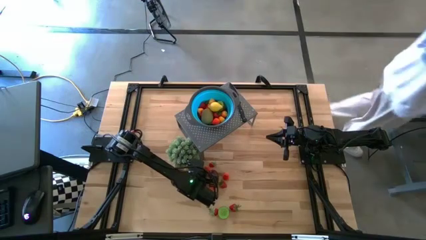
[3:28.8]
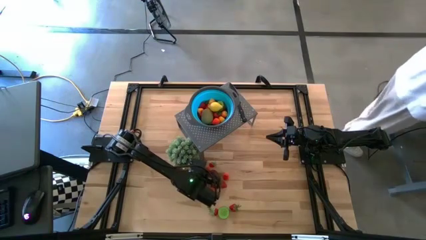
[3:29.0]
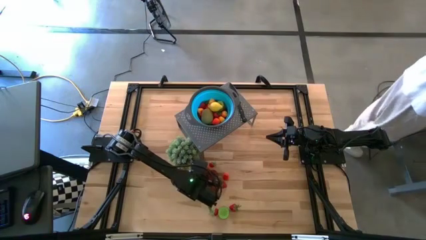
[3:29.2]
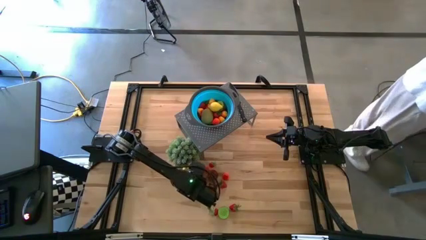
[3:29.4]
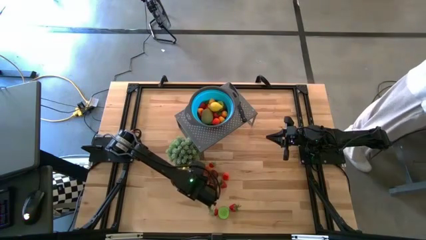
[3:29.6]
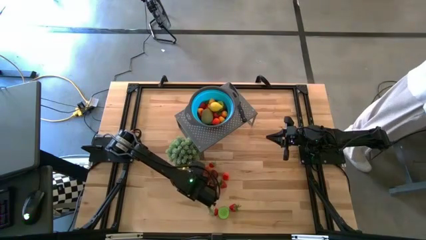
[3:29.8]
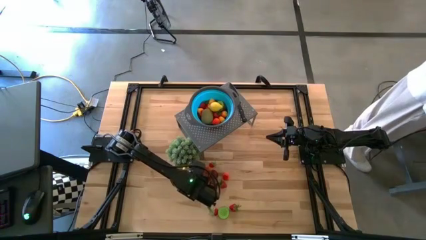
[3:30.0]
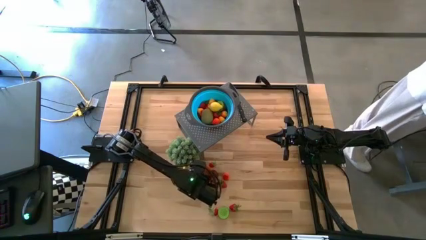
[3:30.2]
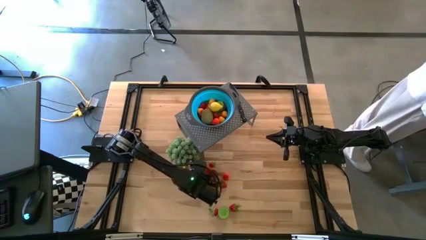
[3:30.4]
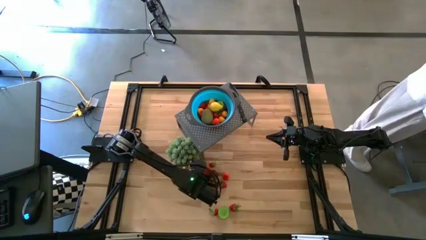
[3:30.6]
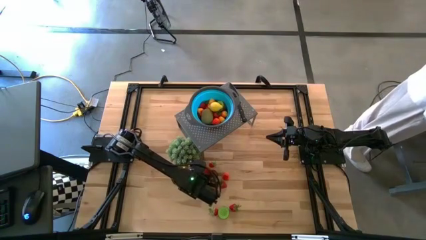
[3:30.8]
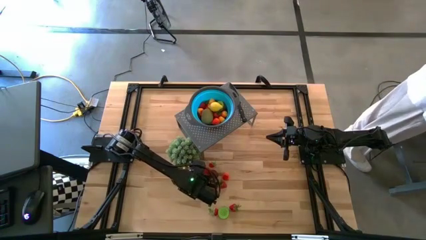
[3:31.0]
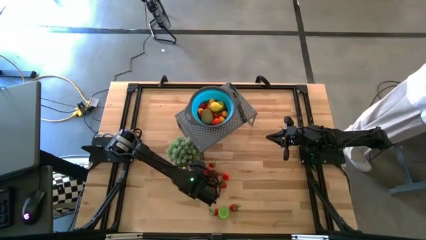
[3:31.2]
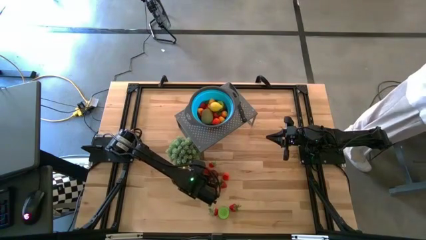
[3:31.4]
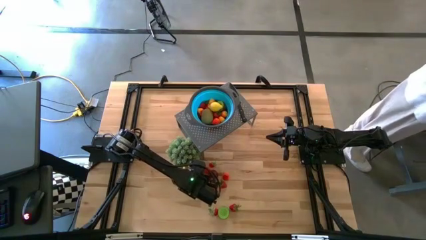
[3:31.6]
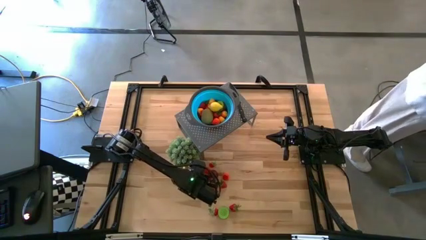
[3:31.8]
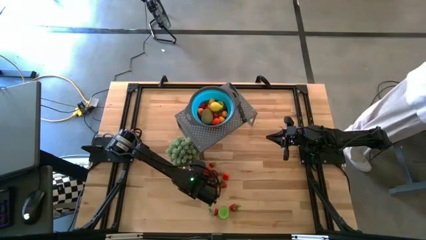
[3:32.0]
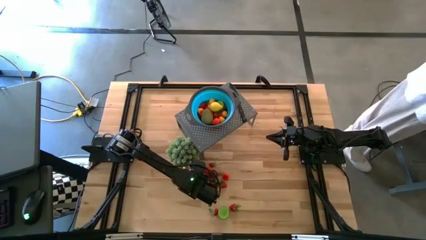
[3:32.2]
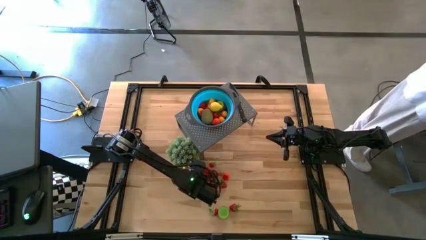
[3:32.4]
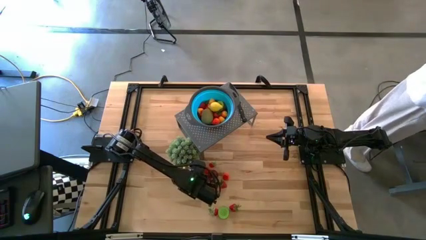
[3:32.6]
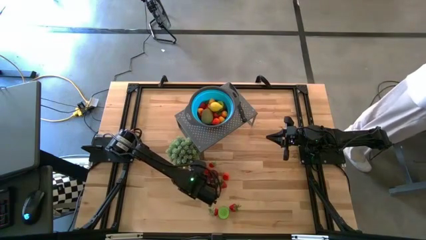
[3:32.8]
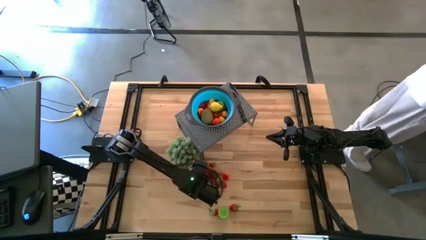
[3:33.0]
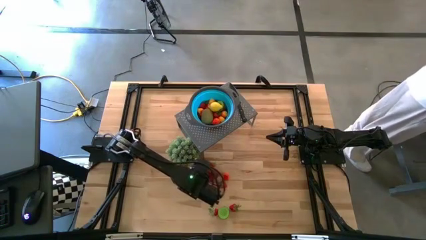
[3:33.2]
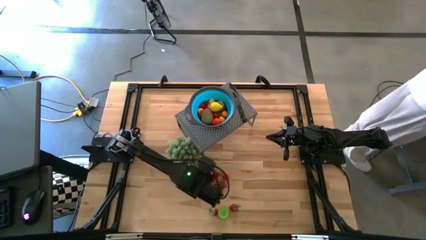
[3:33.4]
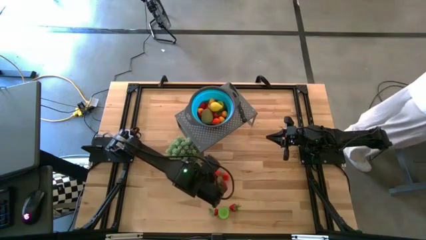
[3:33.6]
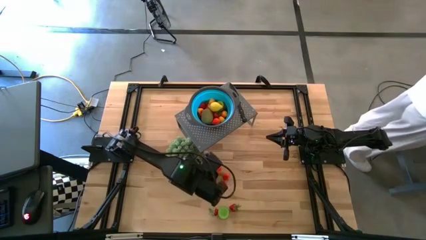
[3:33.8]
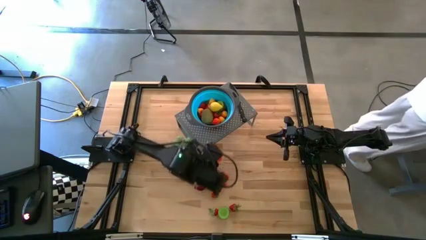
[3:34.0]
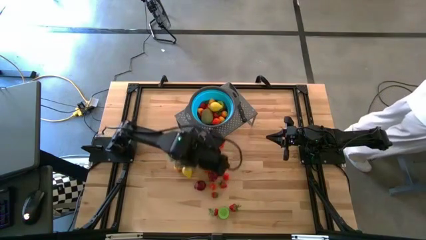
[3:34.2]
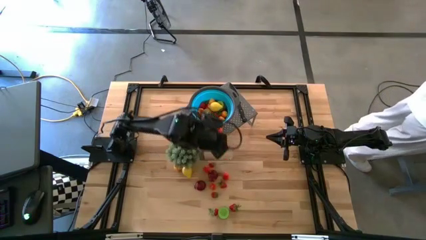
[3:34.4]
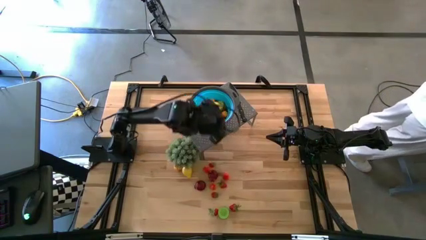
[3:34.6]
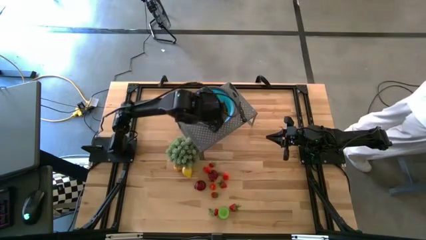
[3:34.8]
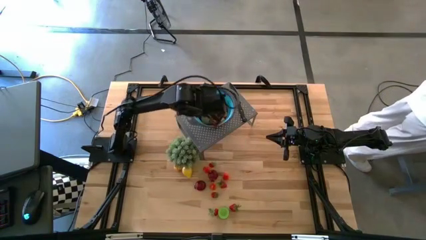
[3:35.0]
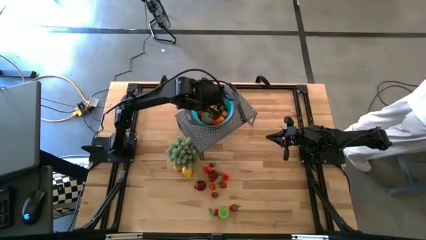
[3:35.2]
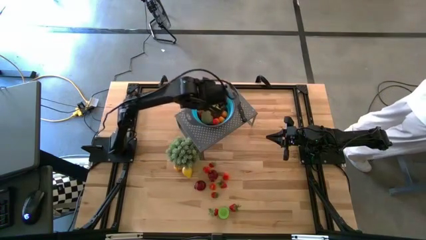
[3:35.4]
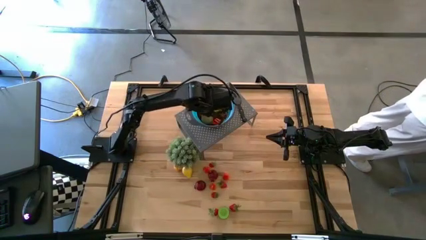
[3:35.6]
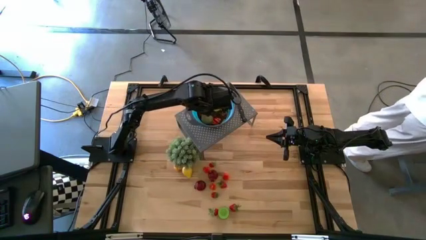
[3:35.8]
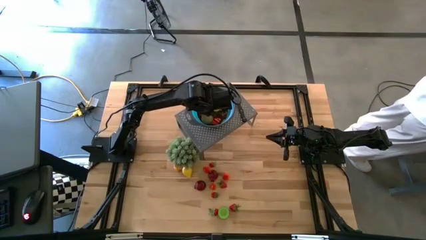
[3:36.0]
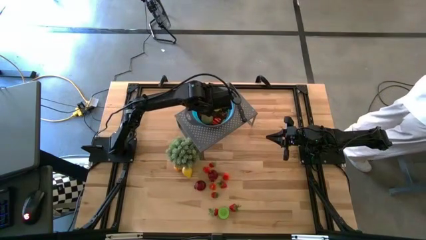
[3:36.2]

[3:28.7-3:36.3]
Task: Pick & Place Fruit
Put the pear into the blue strainer bowl on the shelf

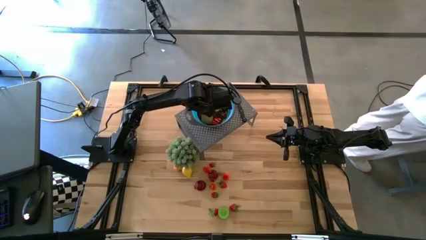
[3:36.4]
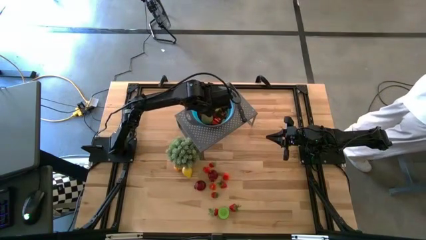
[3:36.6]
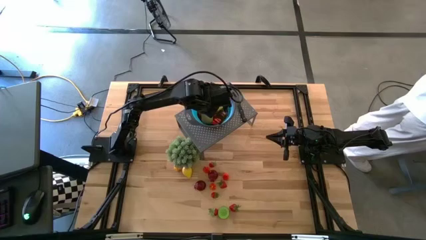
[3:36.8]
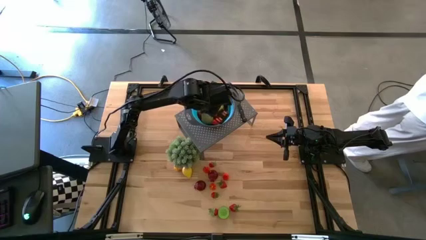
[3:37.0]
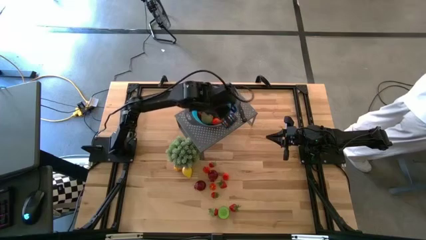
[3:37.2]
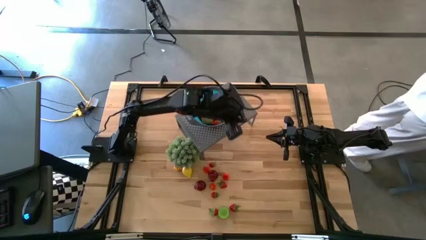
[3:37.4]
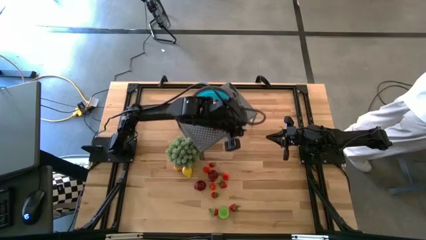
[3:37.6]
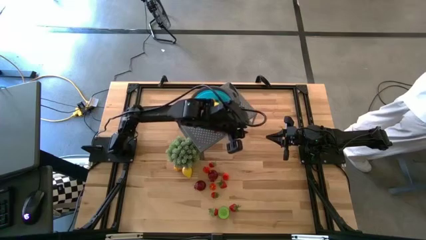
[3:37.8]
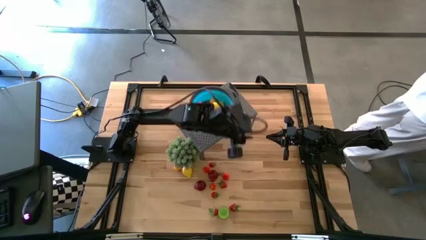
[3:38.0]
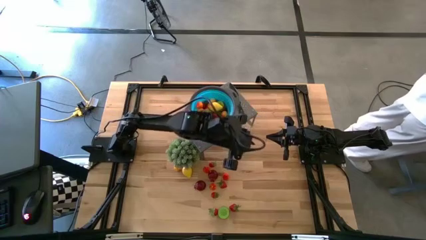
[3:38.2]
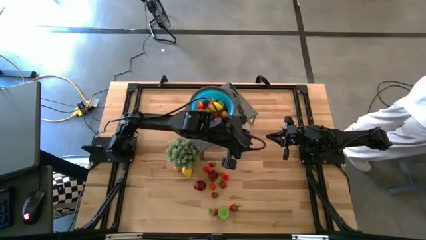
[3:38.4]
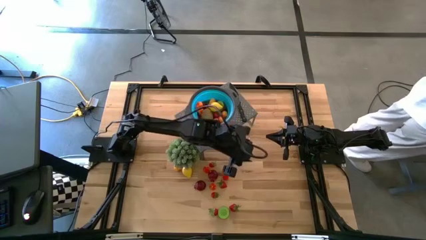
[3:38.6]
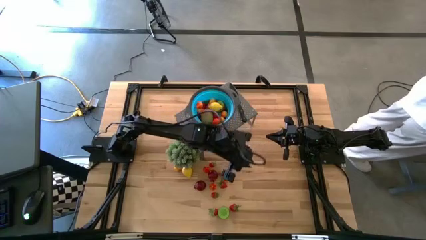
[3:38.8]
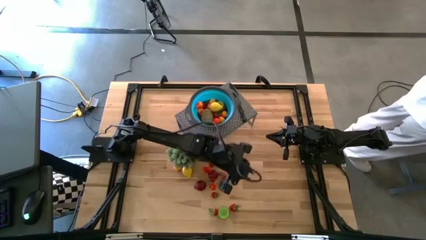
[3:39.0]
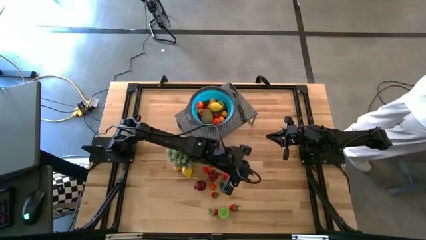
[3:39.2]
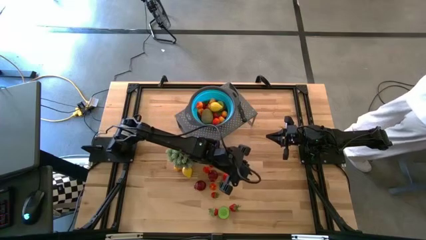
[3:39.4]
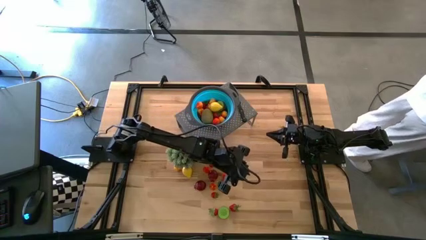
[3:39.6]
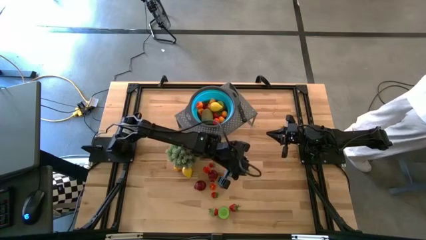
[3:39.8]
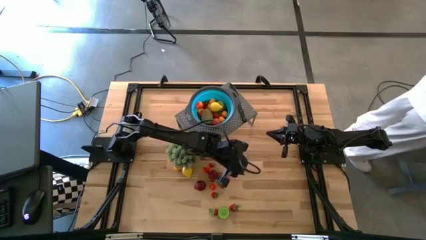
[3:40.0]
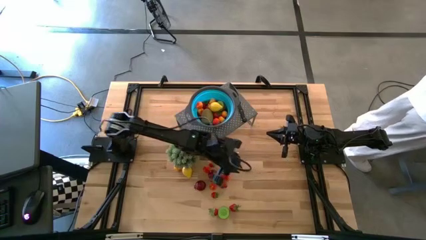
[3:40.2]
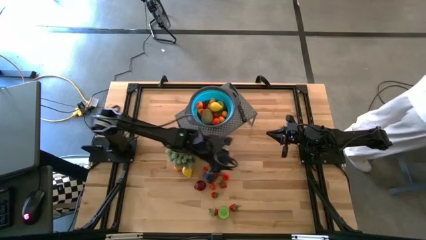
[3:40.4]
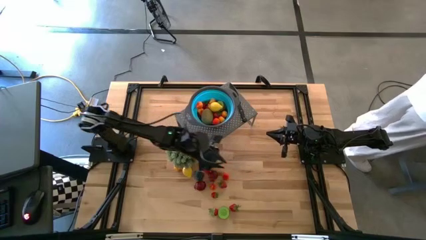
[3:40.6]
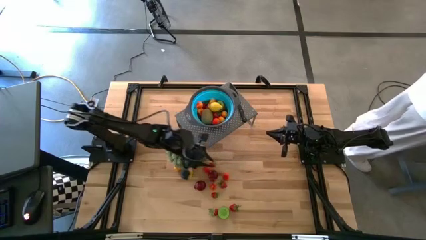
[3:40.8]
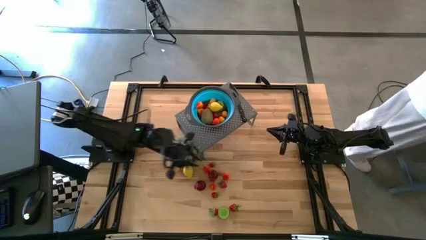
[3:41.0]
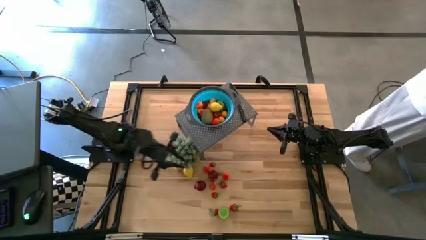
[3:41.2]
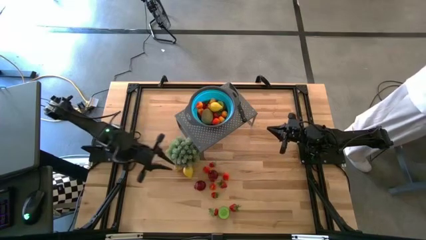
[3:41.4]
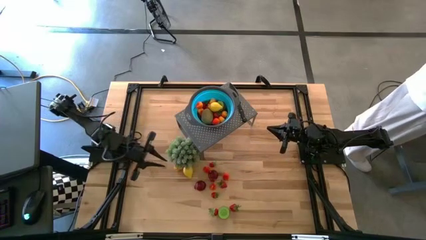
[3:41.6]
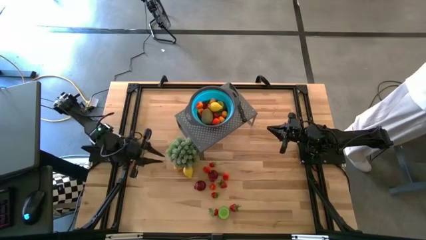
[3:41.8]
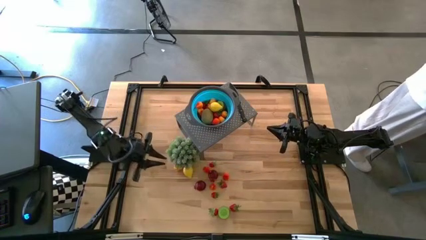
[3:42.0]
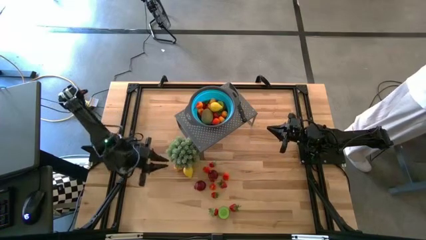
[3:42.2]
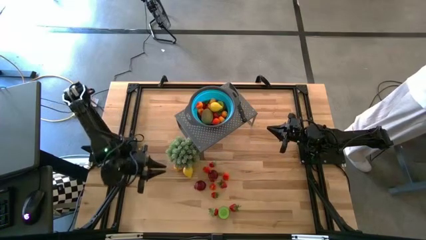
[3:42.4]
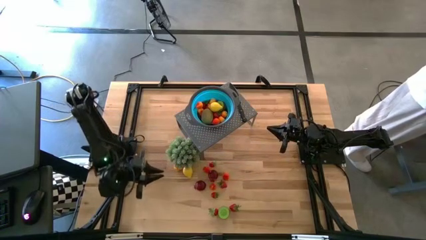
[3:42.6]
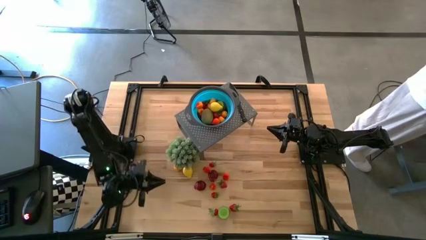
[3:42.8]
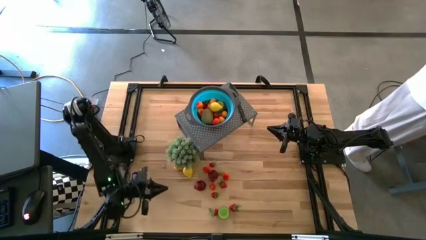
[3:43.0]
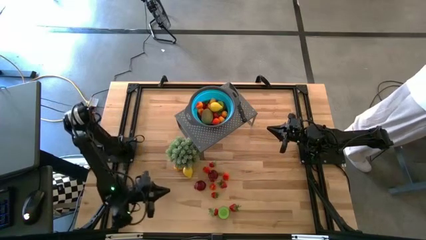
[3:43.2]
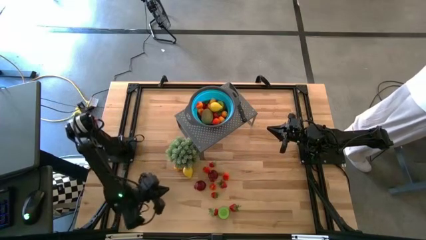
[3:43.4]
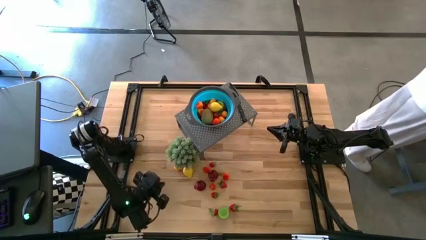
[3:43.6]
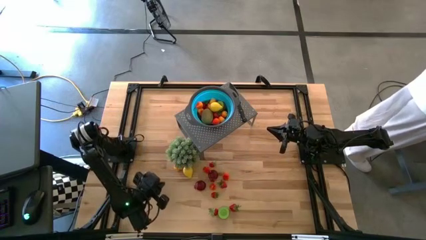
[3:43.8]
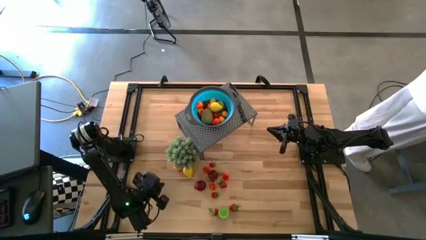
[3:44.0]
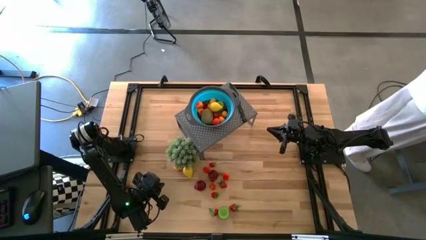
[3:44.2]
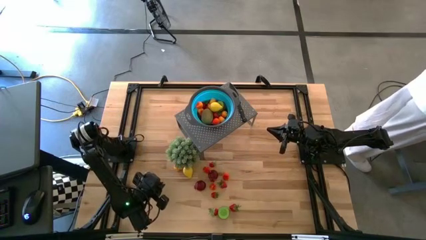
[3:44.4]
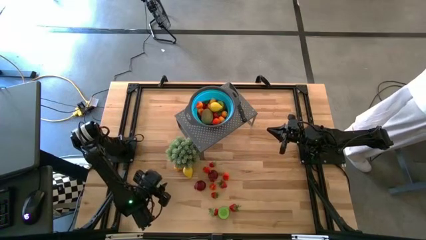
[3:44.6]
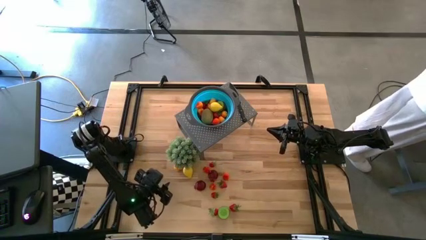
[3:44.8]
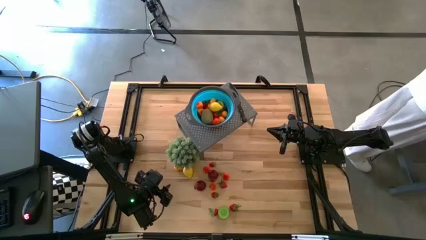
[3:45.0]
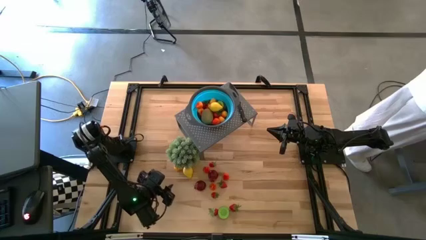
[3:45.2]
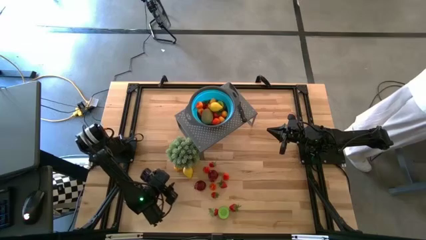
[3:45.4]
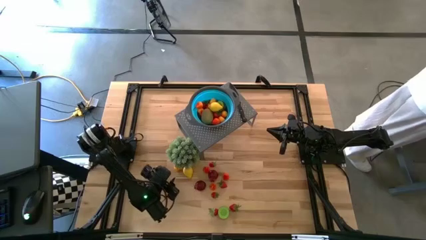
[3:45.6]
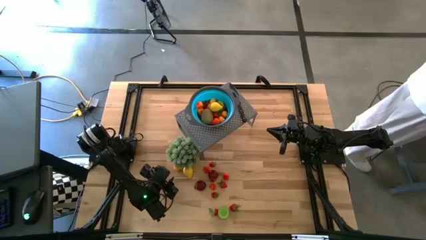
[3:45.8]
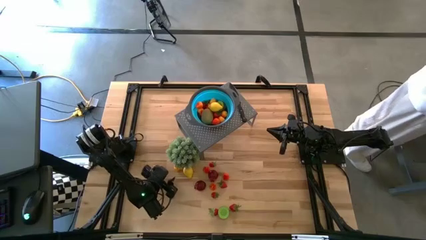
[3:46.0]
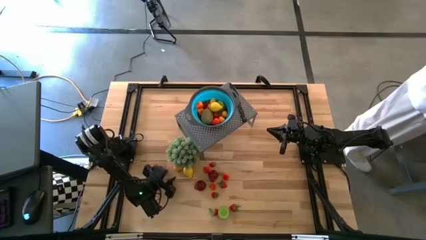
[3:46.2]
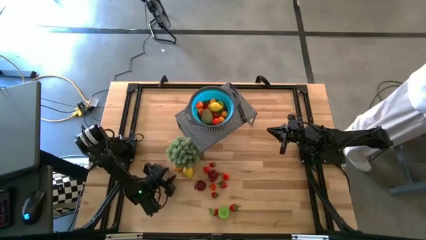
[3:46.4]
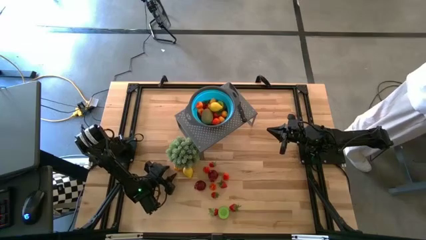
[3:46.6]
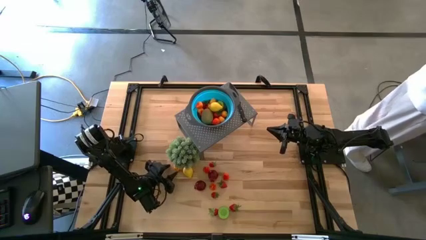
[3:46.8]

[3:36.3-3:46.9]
Put the pear into the blue strainer bowl on the shelf
